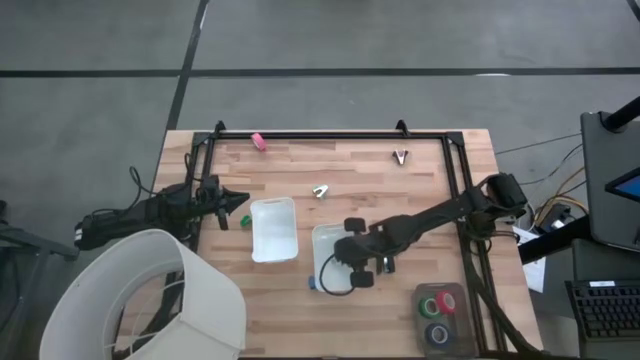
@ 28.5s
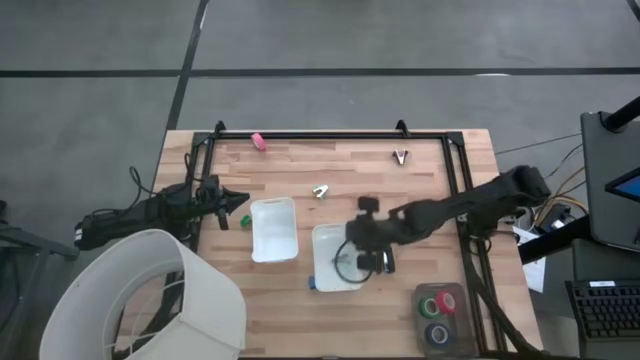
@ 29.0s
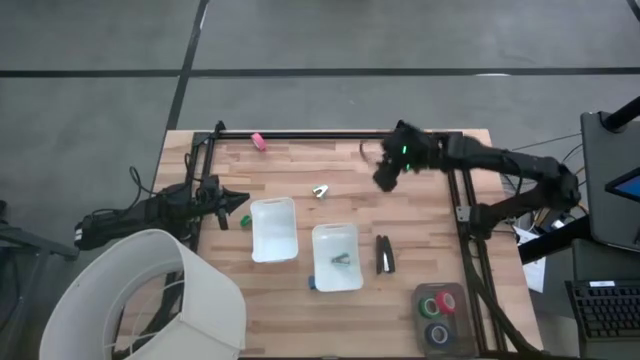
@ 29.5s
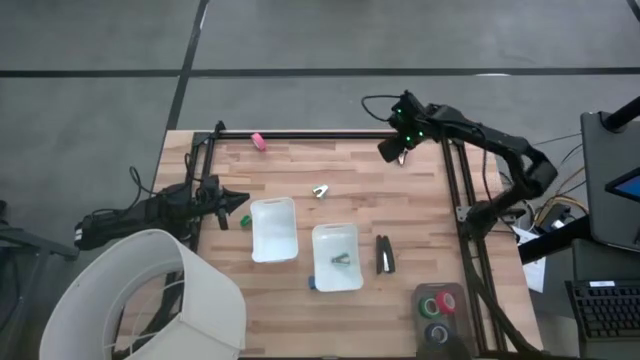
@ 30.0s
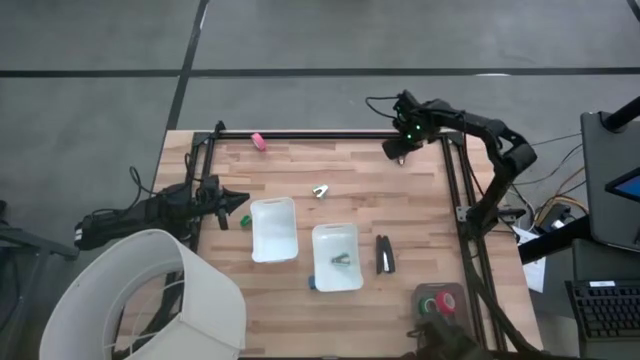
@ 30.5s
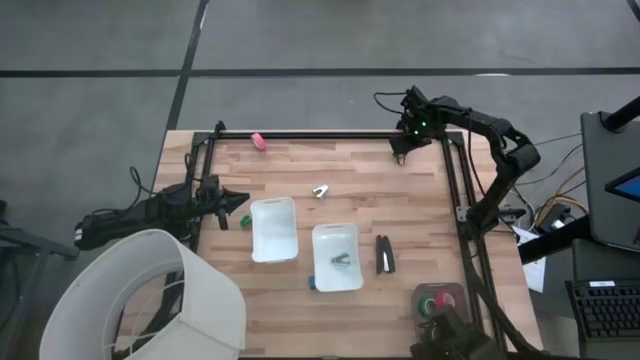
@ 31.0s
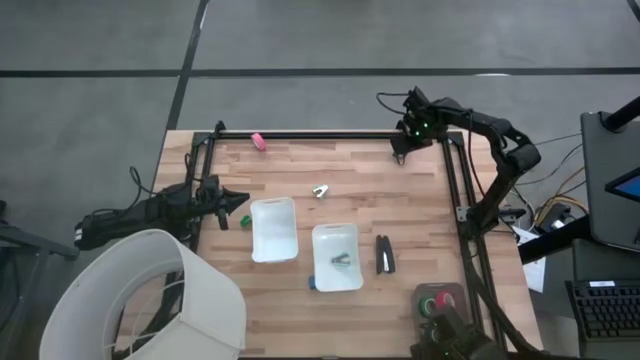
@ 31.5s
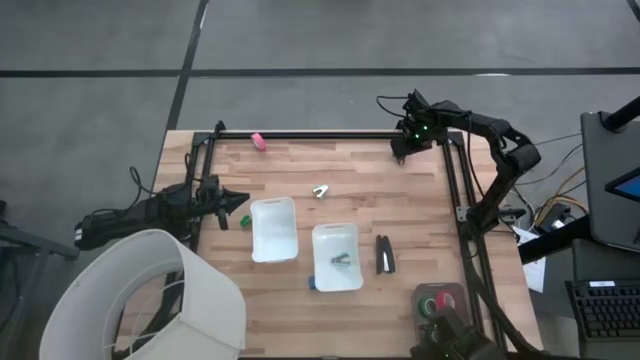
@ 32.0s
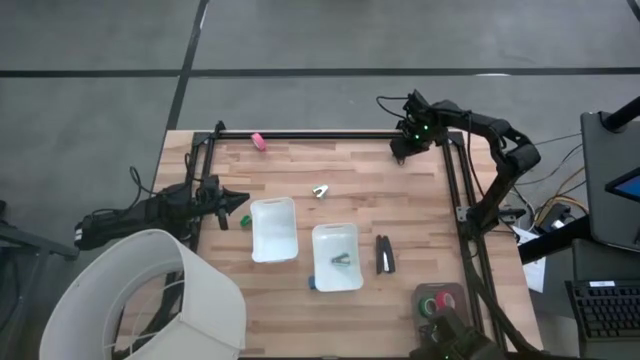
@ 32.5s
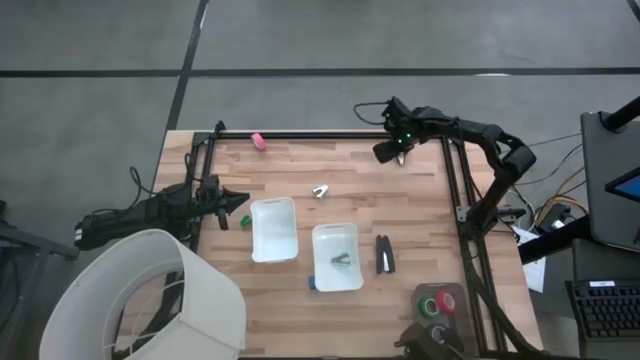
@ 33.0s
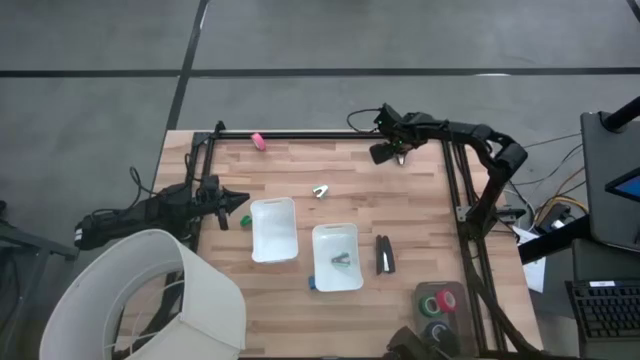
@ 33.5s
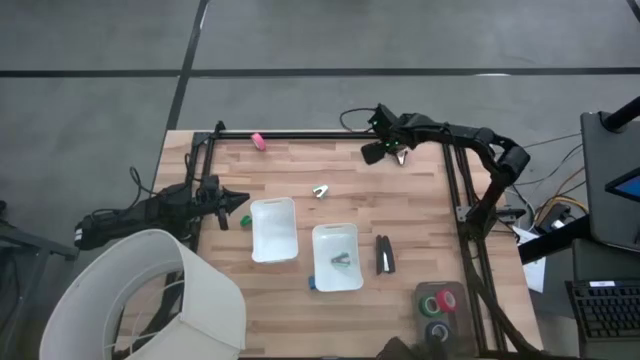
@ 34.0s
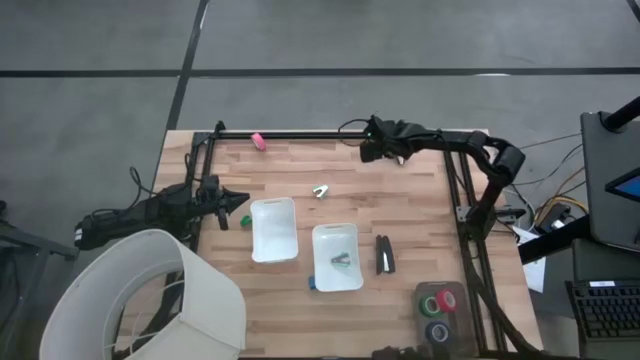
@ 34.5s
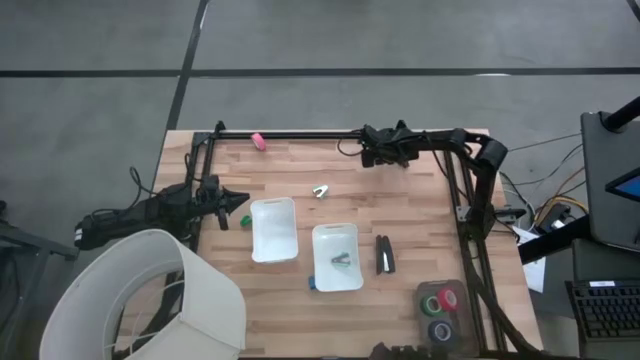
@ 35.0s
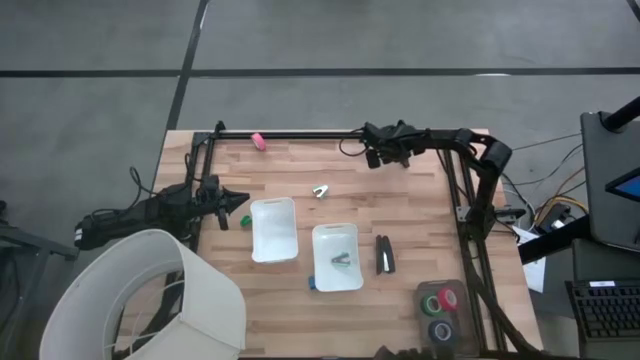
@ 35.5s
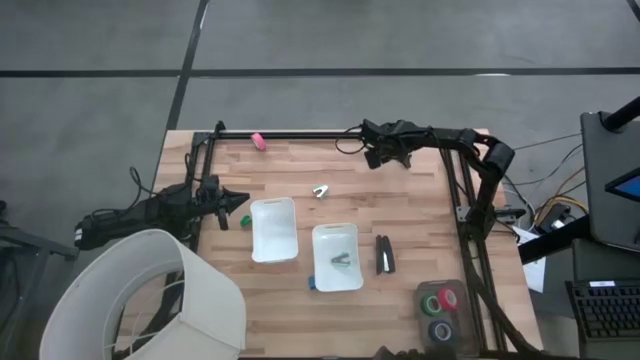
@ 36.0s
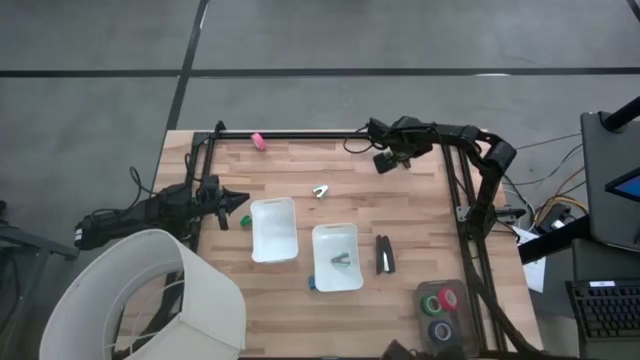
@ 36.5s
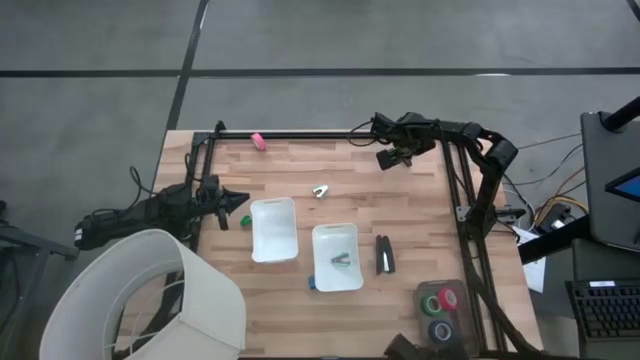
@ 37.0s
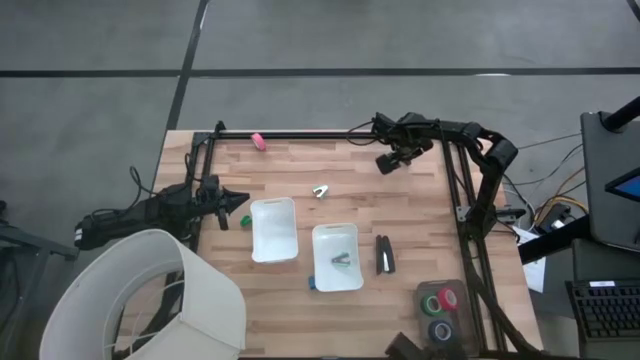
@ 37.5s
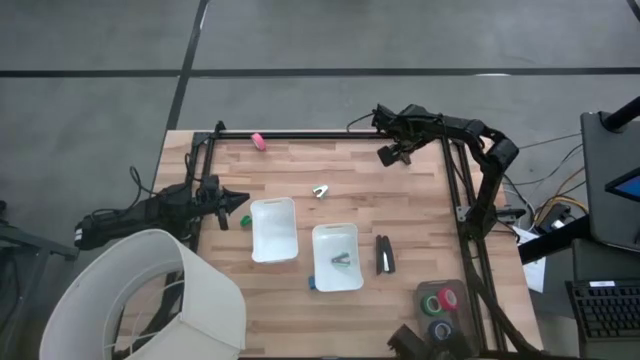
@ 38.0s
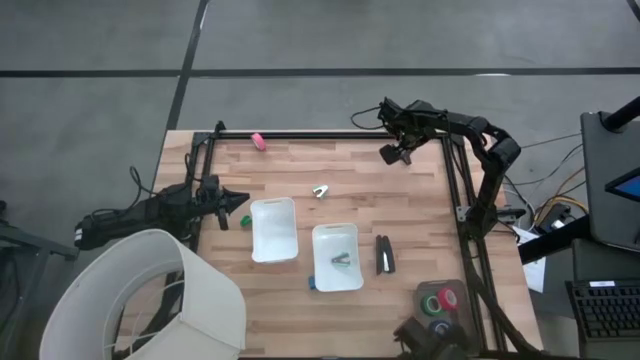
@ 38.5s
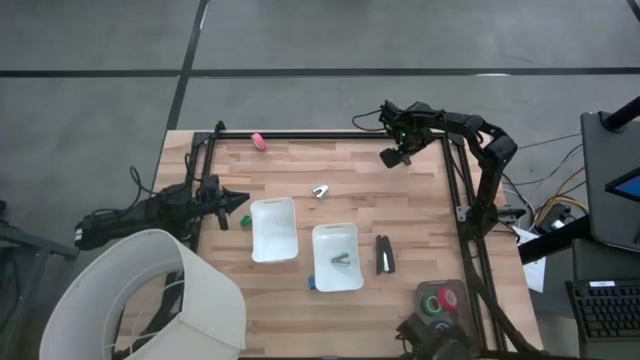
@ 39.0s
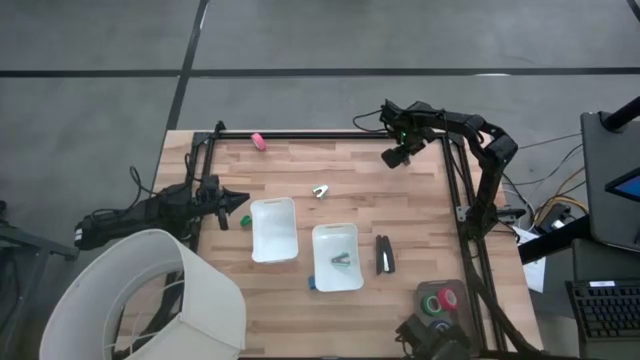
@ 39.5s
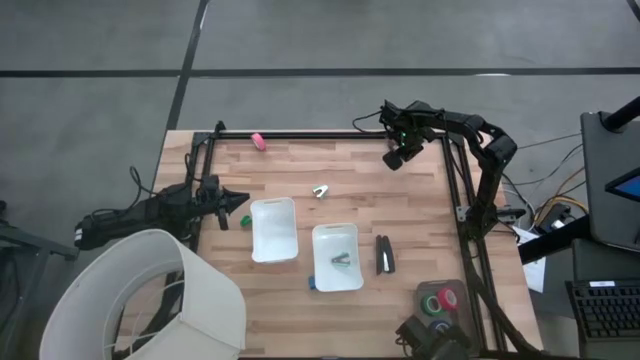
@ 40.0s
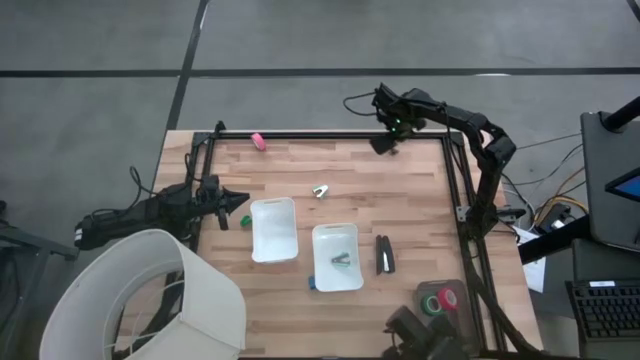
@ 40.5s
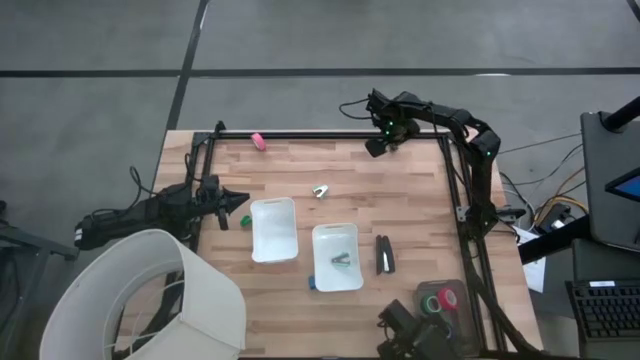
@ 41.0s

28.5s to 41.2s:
Task: Pick and place Stapler, Stapler remover, tape
Put the black staple remover into the right white bin

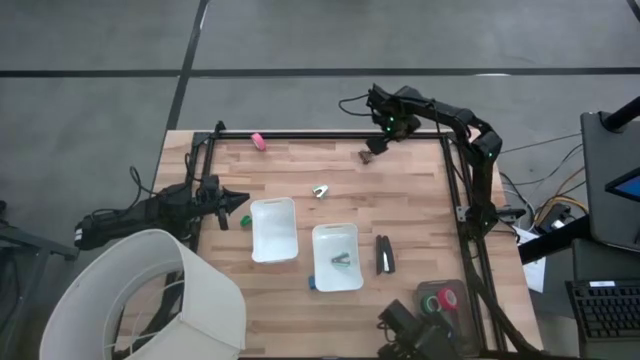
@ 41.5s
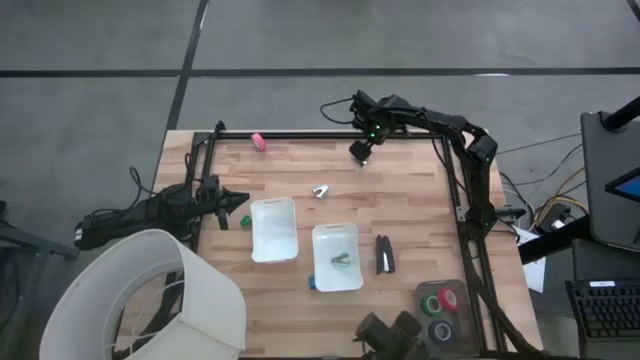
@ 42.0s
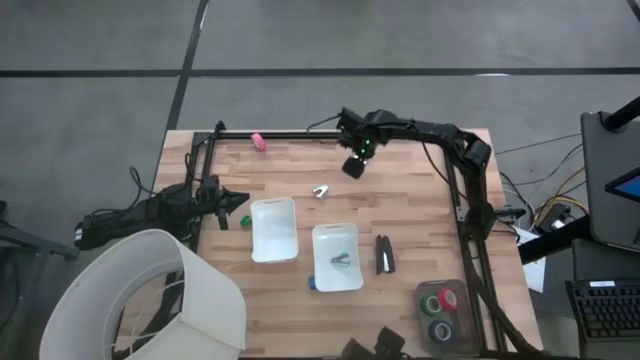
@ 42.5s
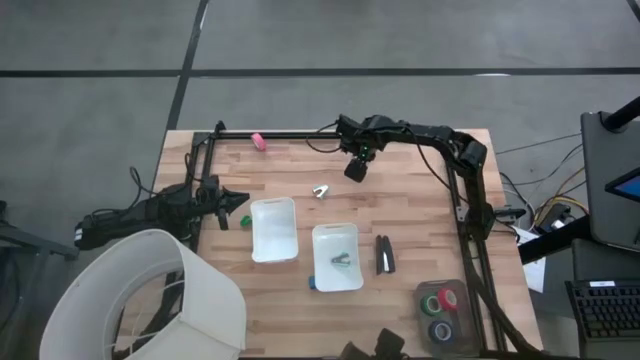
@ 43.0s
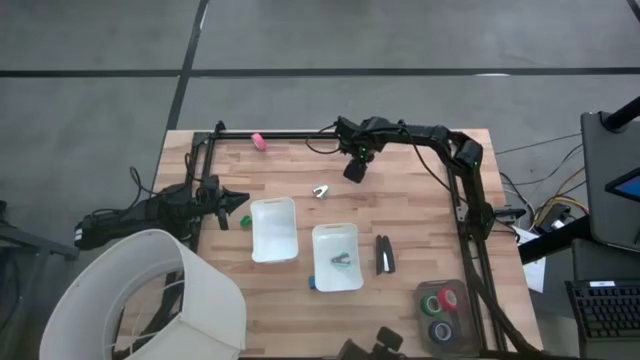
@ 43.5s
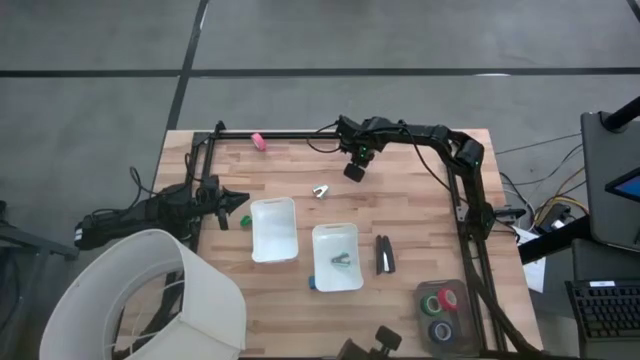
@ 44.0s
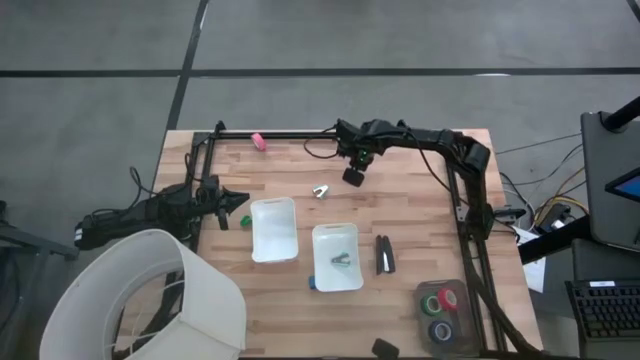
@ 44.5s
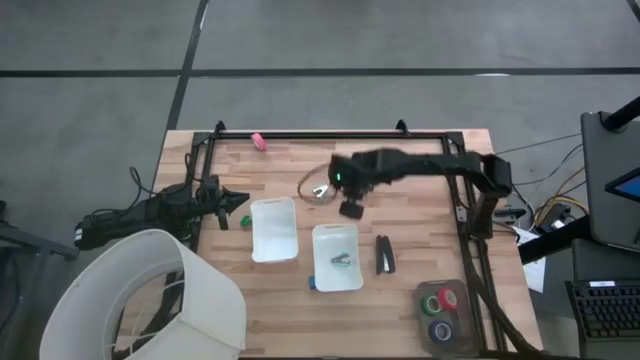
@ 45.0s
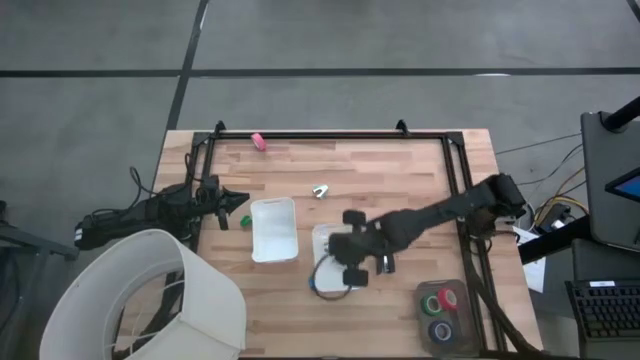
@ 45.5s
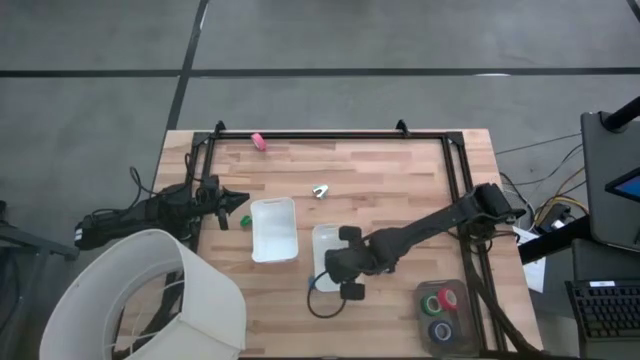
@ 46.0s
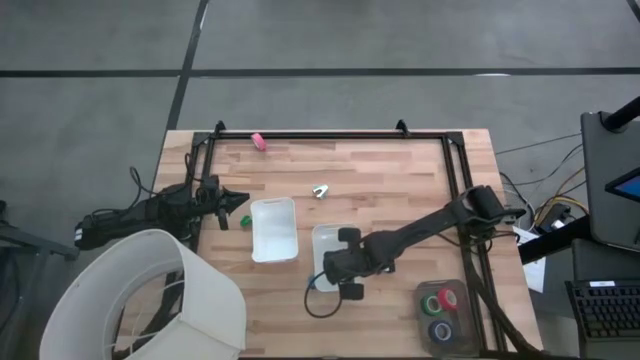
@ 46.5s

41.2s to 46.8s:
Put the black staple remover into the right white bin

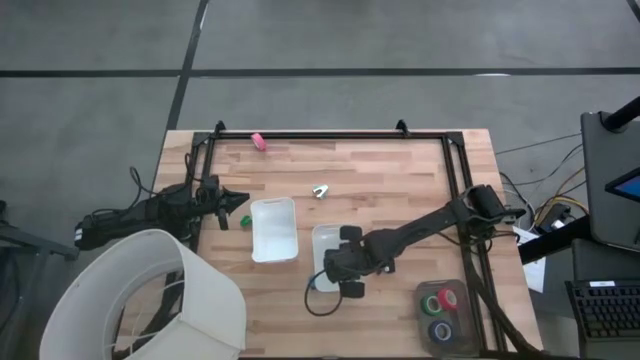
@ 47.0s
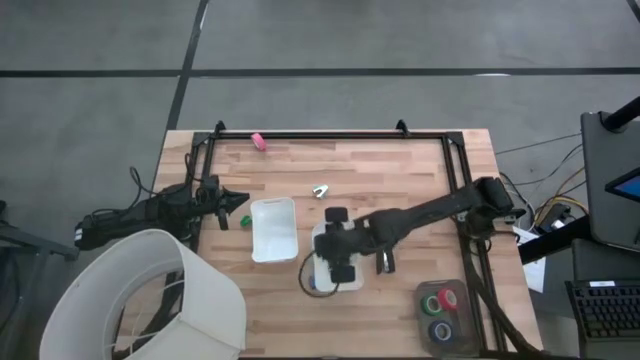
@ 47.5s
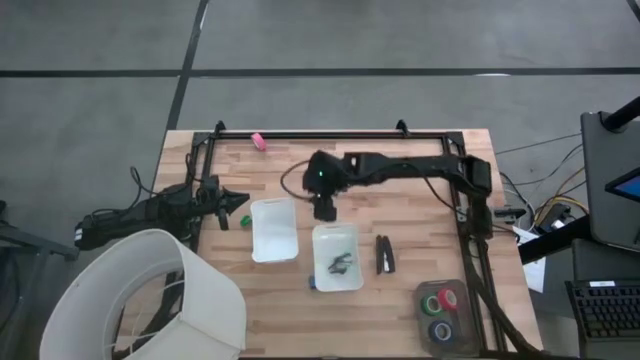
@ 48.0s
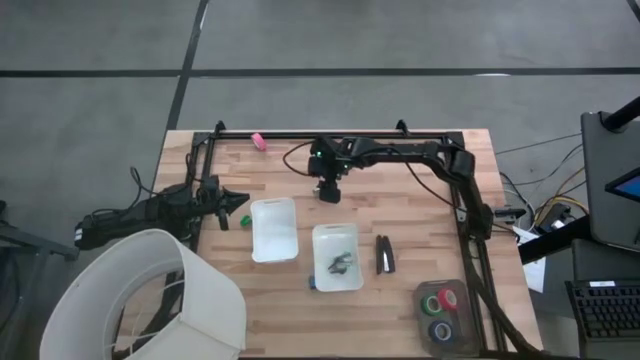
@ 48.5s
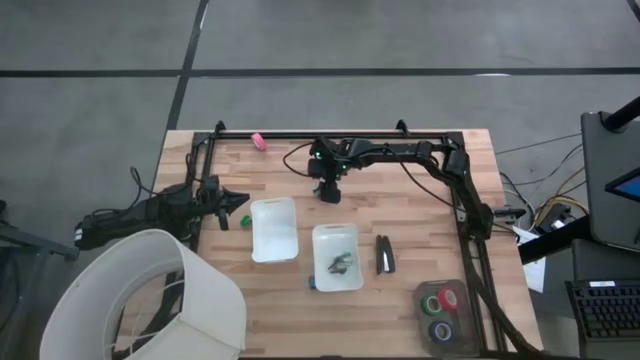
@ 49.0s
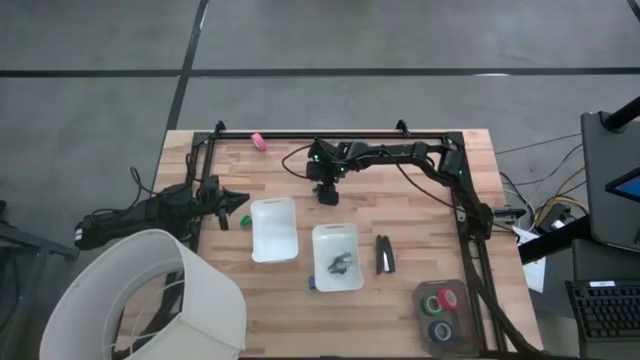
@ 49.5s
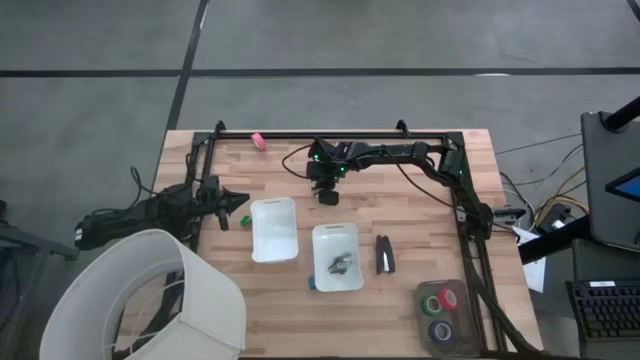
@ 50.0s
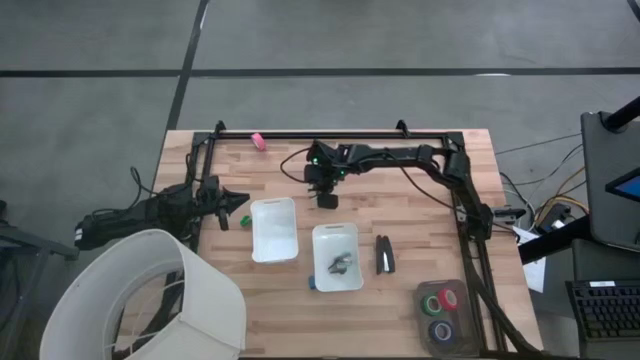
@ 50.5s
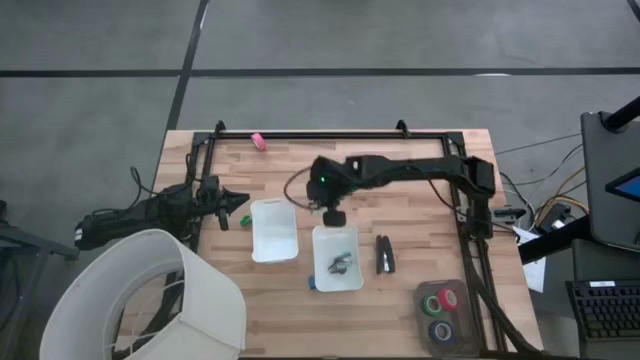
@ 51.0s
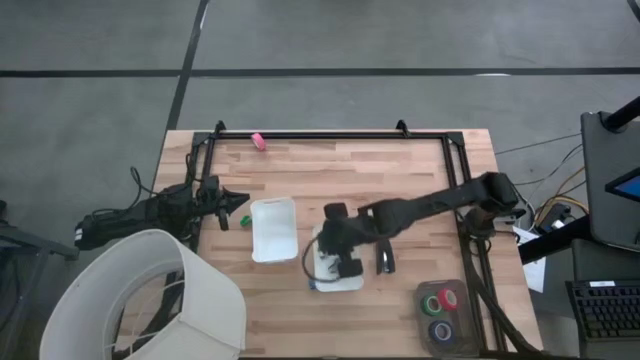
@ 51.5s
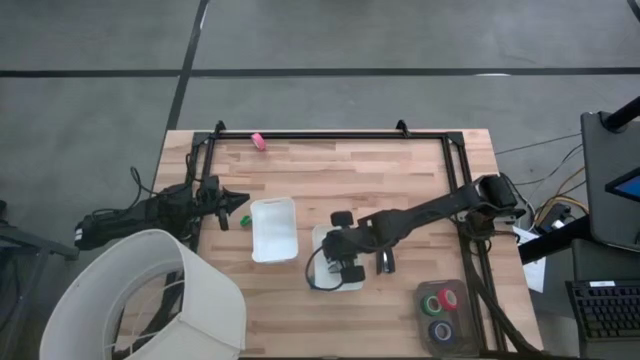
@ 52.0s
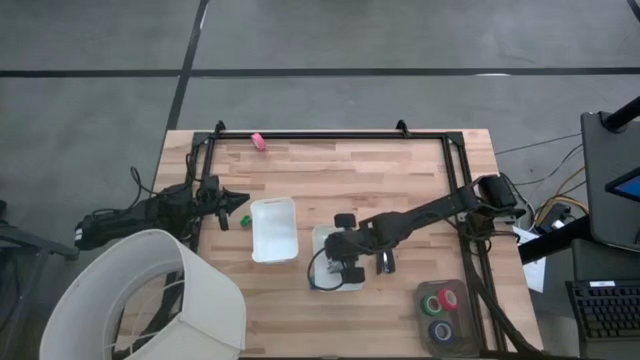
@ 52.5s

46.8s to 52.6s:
Put the light blue staple remover into the right white bin
